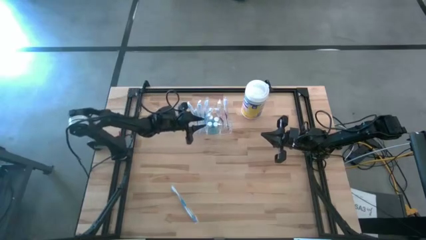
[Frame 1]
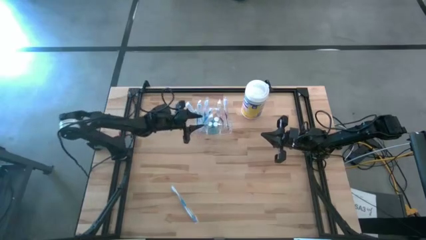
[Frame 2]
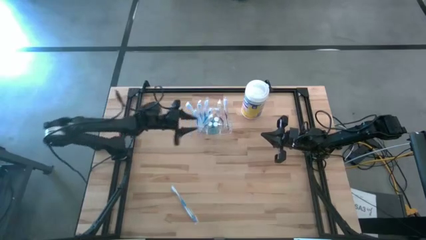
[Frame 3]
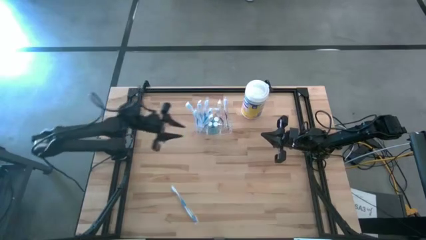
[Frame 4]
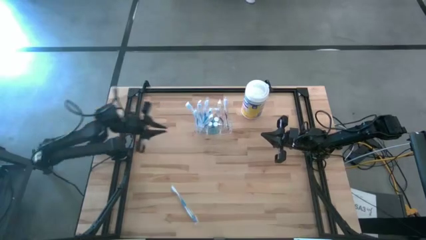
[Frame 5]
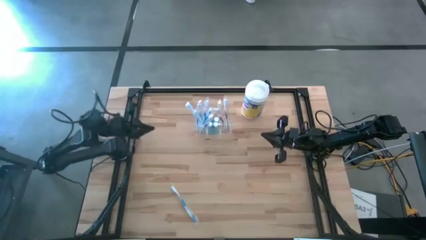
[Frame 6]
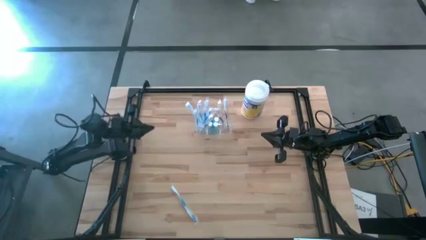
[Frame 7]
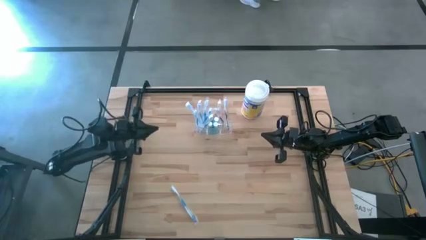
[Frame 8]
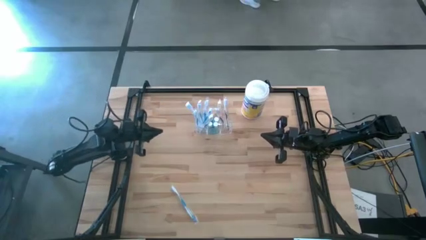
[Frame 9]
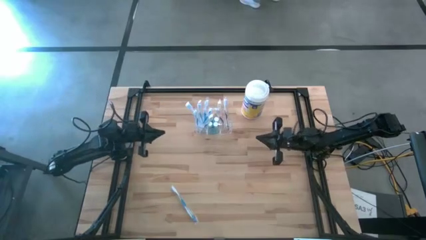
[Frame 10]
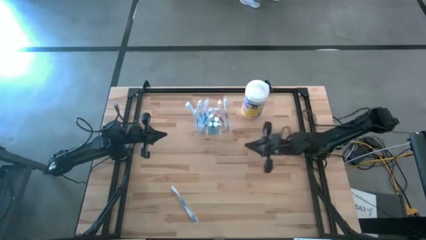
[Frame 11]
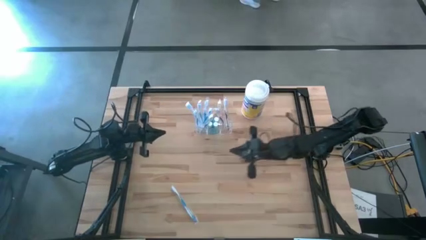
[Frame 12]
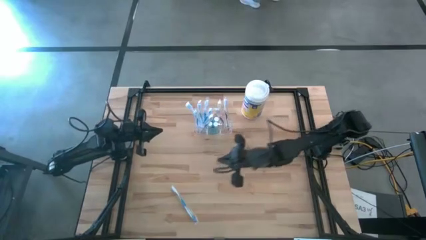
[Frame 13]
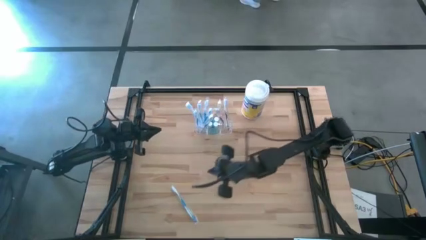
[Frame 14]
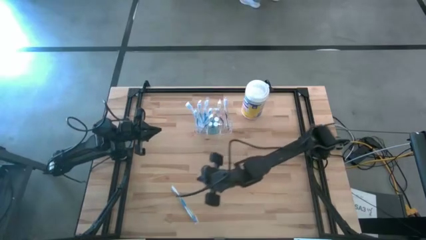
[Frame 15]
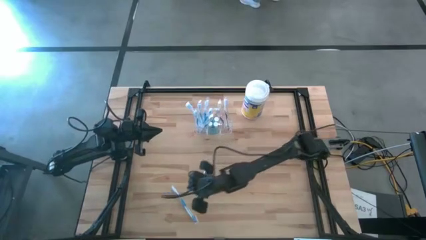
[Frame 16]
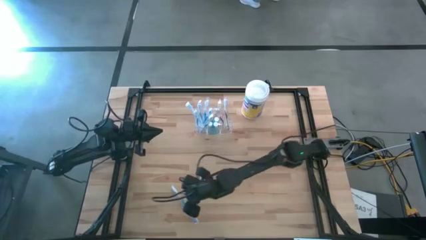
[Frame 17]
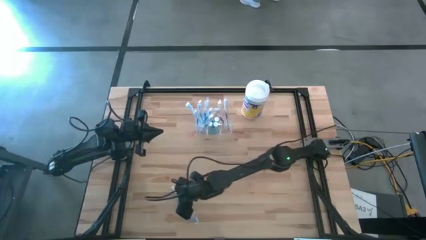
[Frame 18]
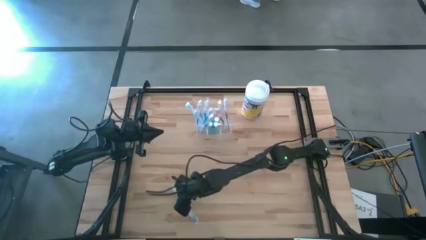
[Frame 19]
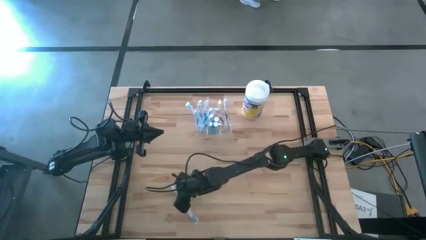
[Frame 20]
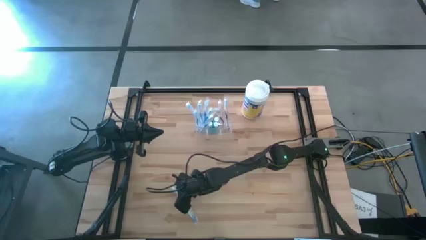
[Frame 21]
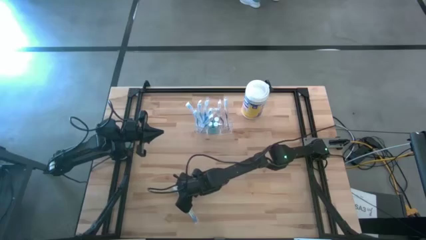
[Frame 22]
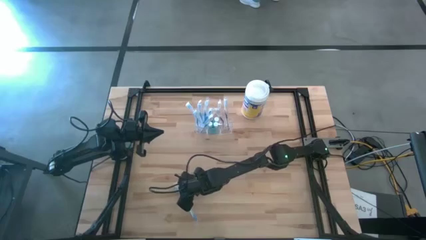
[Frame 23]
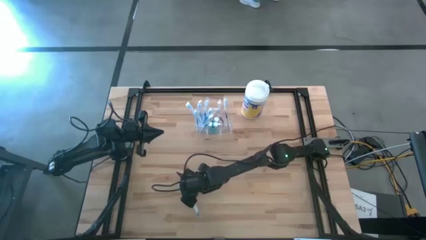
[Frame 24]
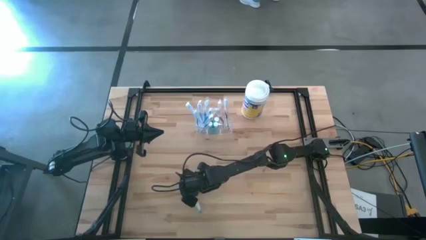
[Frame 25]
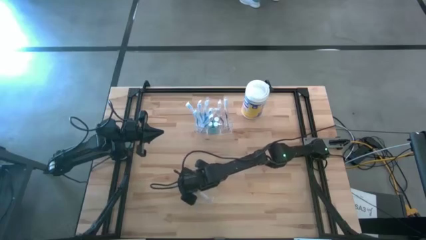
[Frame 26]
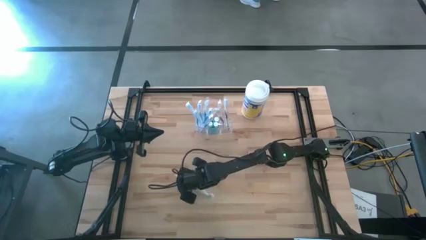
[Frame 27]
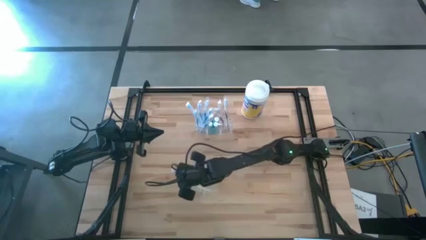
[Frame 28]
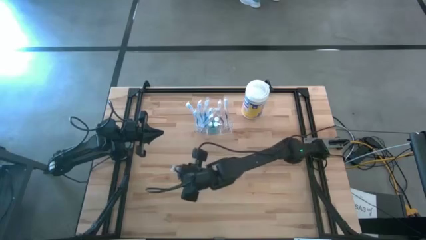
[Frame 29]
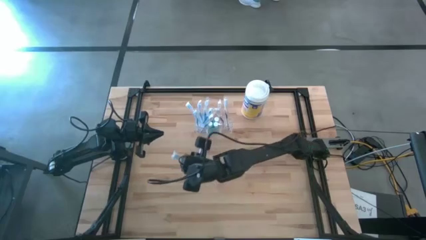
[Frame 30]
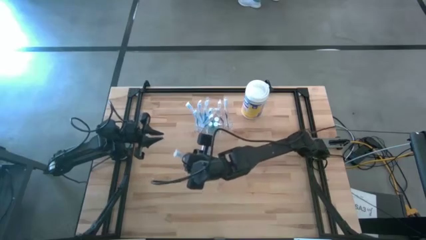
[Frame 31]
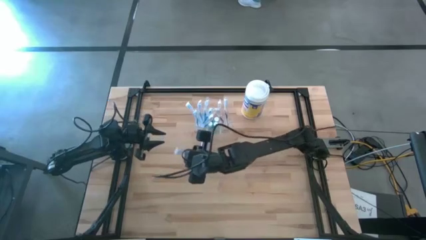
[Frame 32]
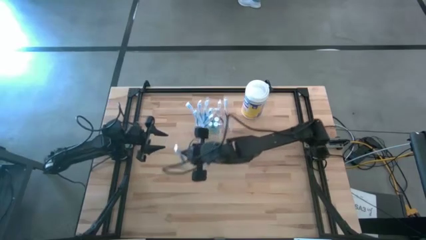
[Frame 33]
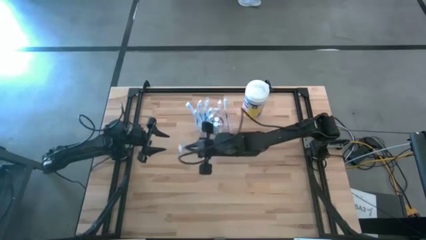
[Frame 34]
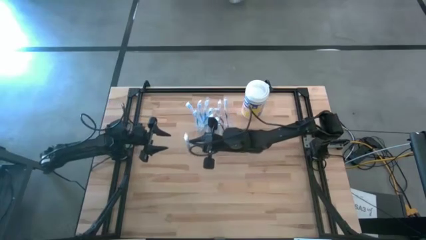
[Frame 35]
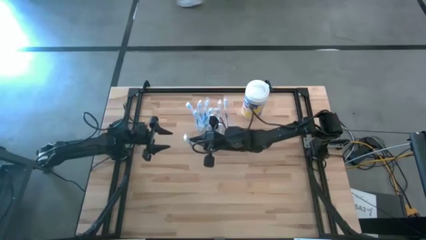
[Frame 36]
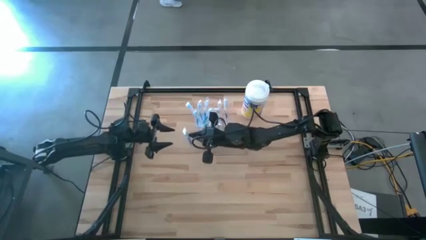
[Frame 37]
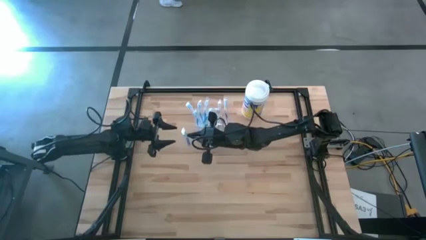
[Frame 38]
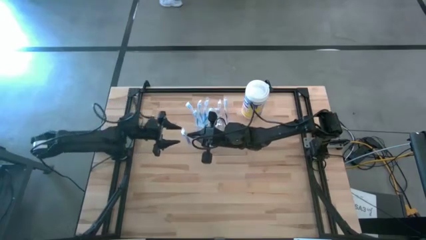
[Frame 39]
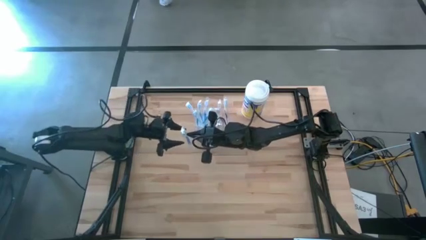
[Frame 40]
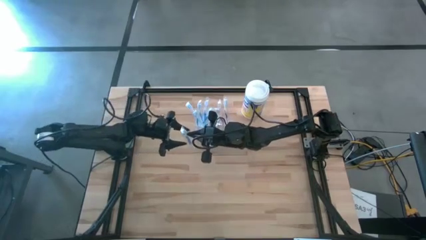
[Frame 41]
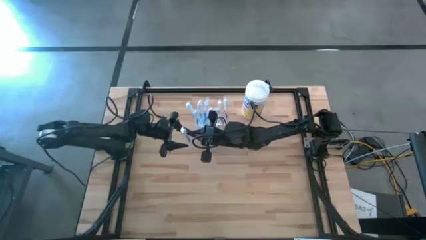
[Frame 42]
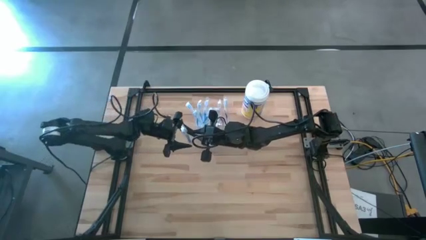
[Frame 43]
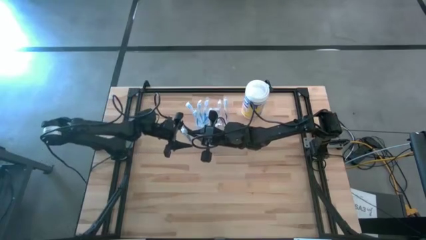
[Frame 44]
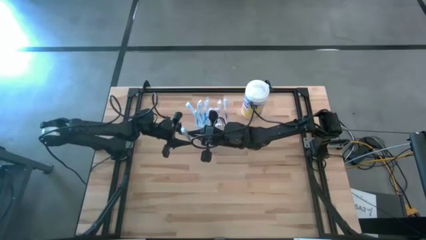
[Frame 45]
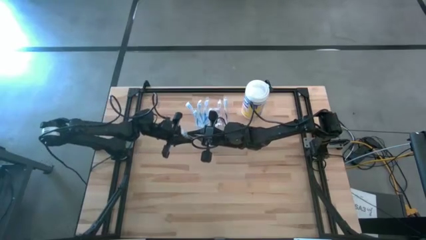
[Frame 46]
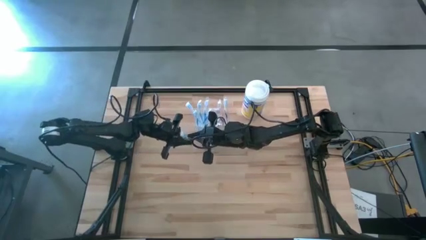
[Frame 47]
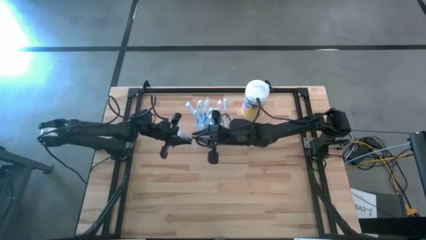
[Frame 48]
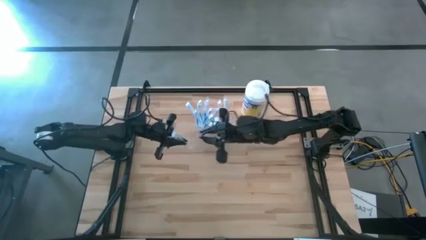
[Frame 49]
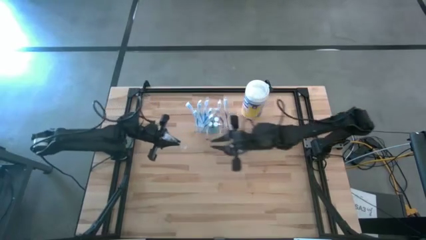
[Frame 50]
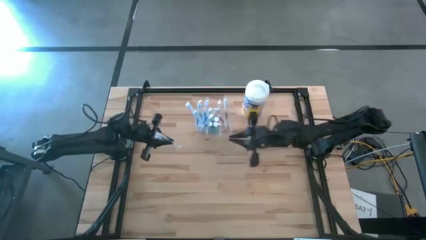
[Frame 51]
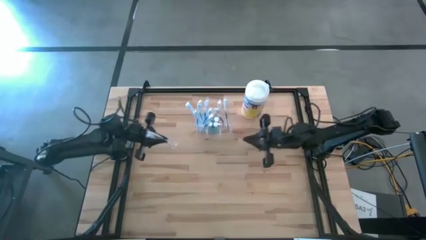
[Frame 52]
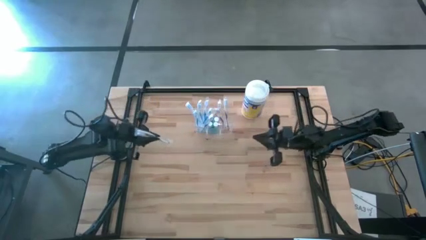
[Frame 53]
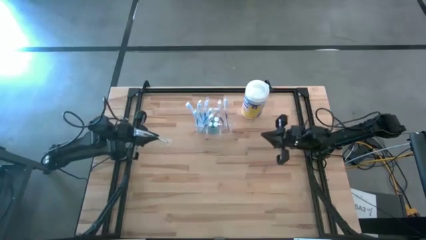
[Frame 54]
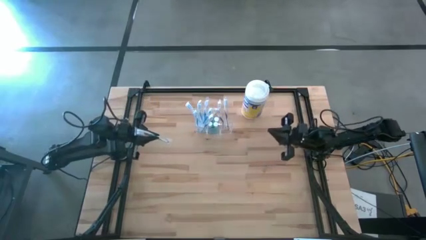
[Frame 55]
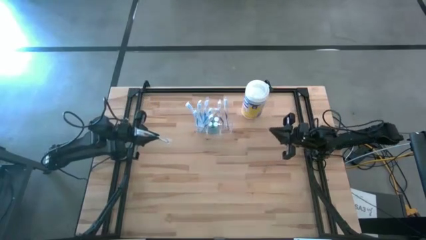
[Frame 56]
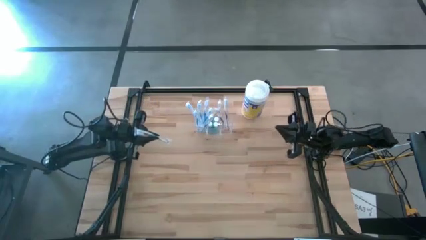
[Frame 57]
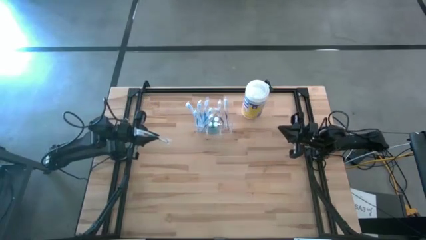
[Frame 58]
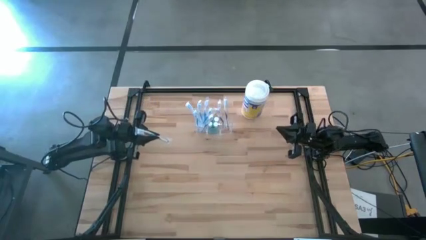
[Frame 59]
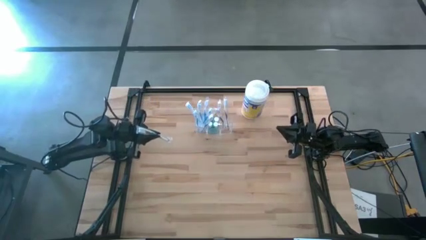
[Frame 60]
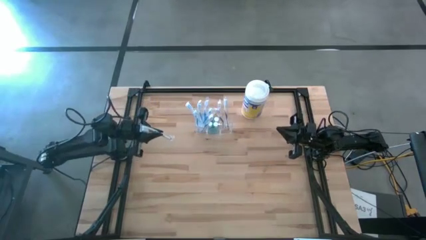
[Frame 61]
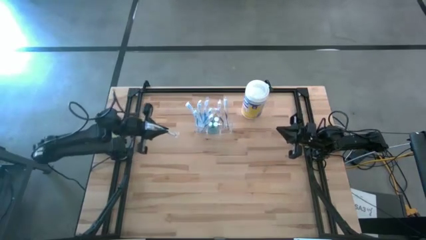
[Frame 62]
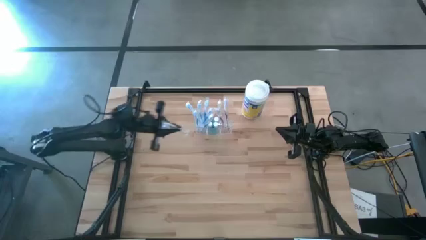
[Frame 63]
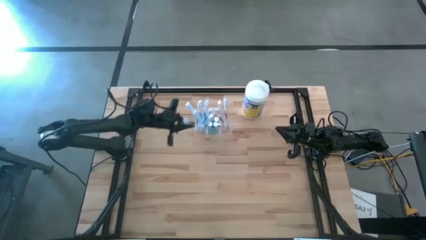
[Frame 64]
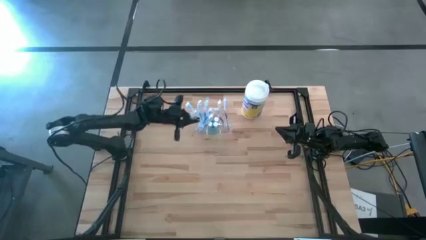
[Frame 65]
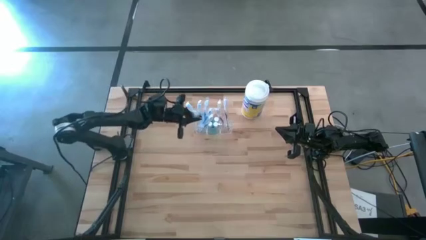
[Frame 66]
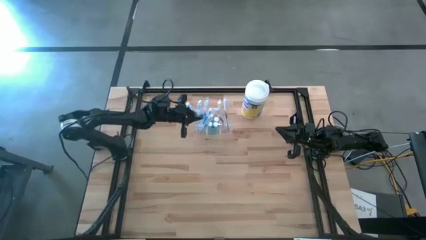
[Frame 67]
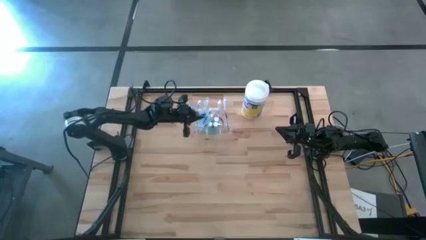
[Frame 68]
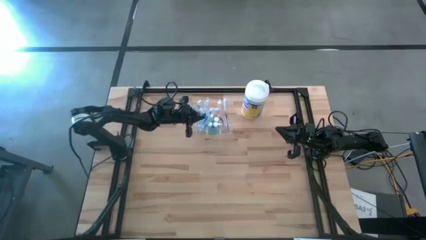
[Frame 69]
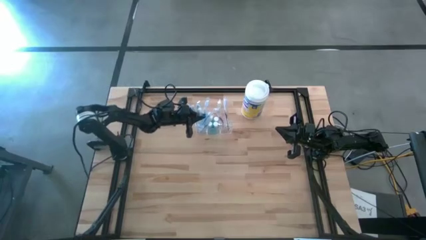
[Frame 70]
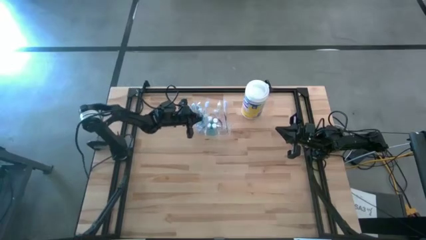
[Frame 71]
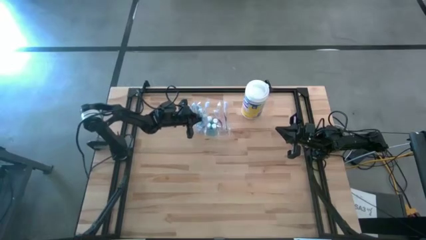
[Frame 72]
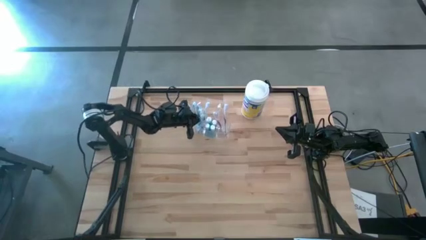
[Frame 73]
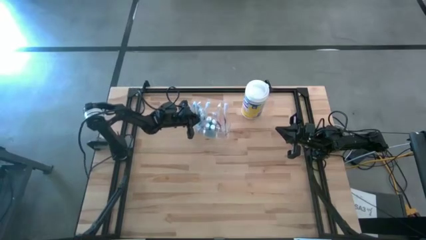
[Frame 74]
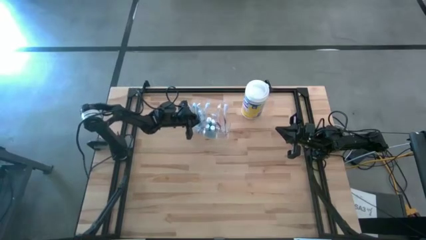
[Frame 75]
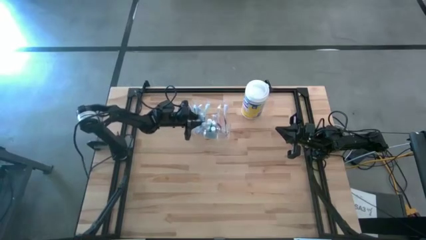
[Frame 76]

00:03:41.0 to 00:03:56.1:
Task: Pick & Place toothbrushing station
Put the blue toothbrush into the transparent organizer
